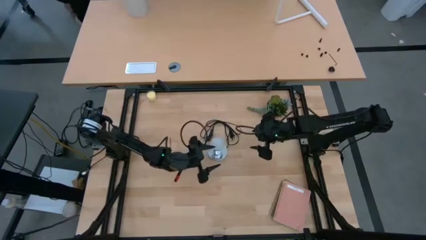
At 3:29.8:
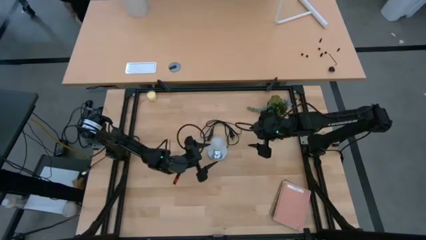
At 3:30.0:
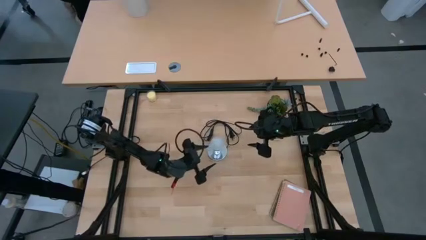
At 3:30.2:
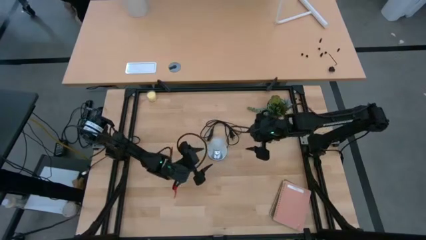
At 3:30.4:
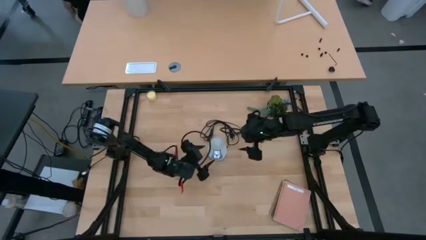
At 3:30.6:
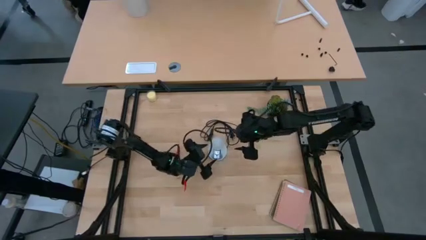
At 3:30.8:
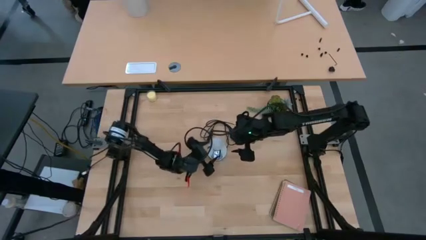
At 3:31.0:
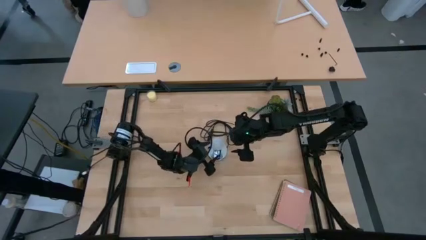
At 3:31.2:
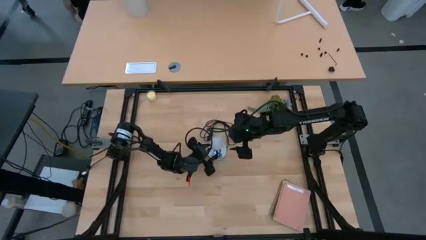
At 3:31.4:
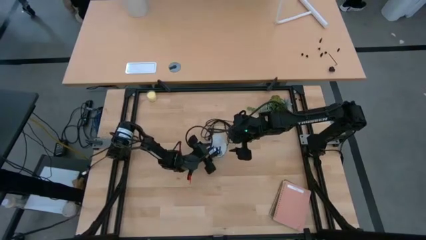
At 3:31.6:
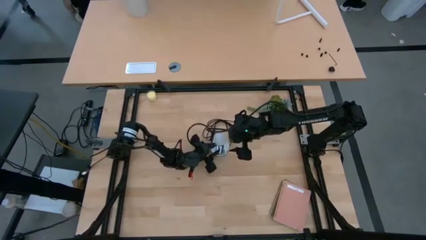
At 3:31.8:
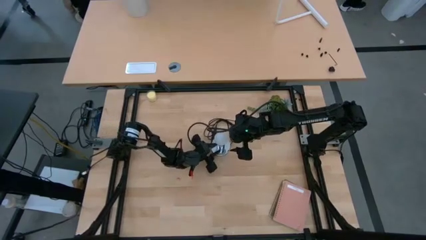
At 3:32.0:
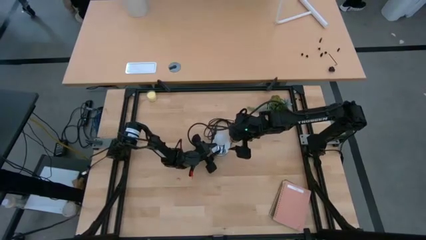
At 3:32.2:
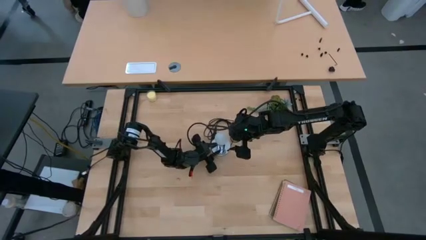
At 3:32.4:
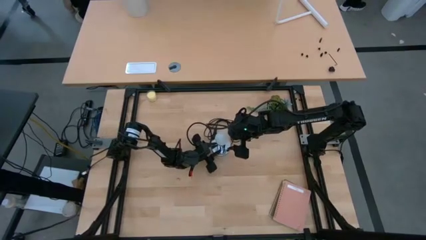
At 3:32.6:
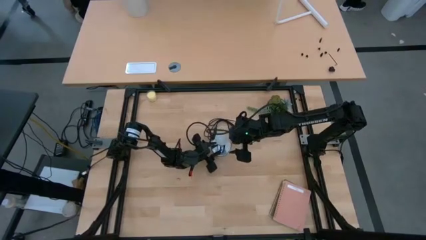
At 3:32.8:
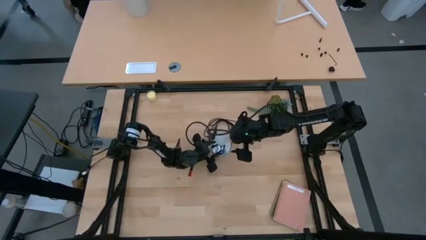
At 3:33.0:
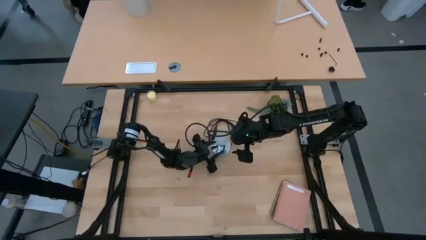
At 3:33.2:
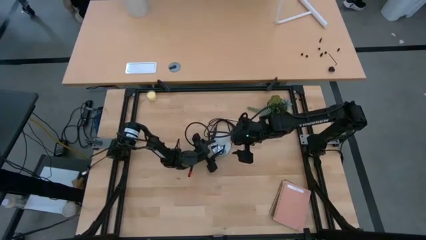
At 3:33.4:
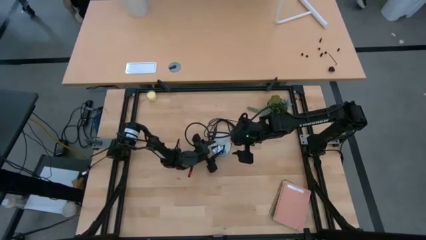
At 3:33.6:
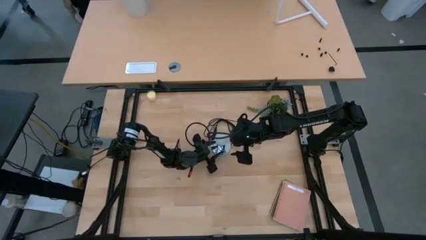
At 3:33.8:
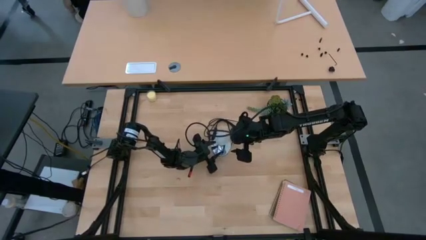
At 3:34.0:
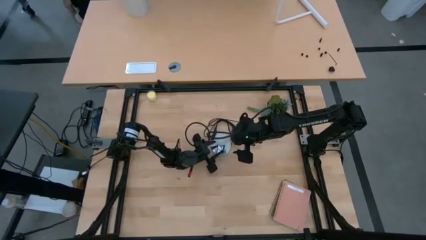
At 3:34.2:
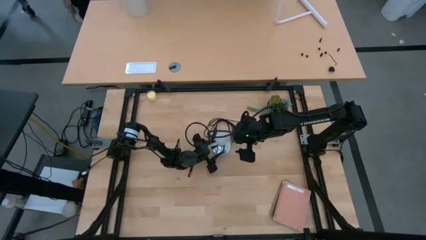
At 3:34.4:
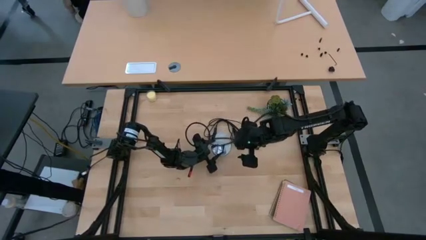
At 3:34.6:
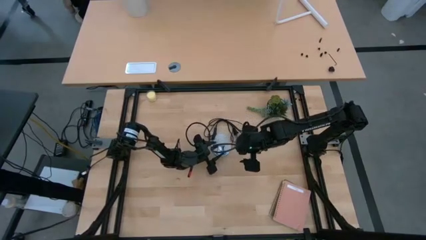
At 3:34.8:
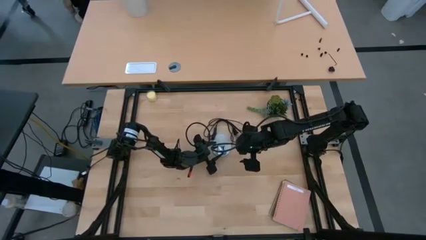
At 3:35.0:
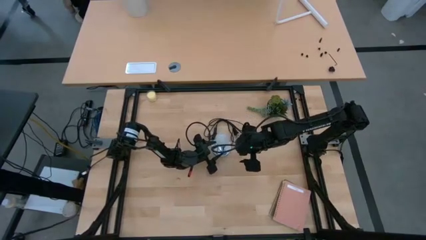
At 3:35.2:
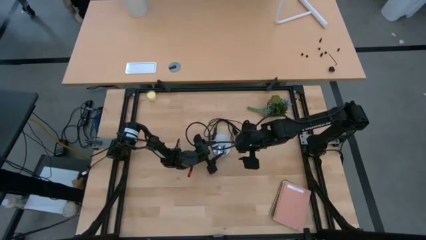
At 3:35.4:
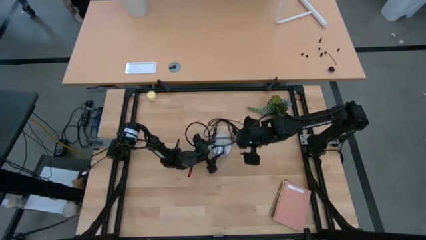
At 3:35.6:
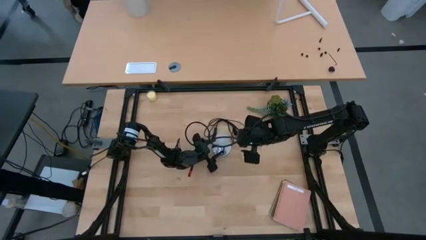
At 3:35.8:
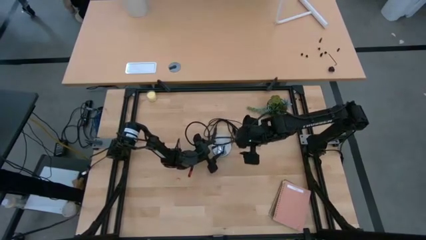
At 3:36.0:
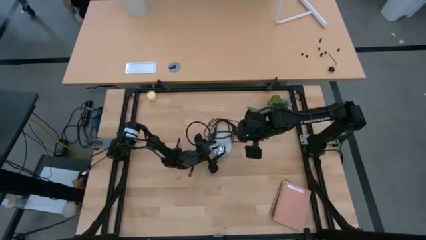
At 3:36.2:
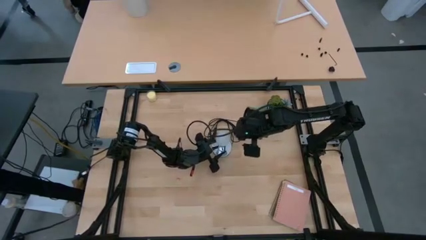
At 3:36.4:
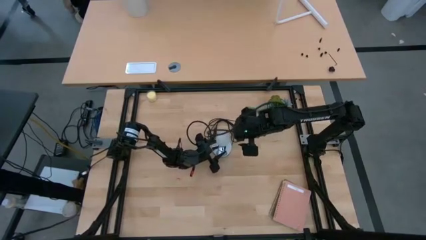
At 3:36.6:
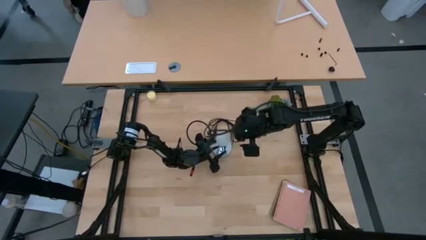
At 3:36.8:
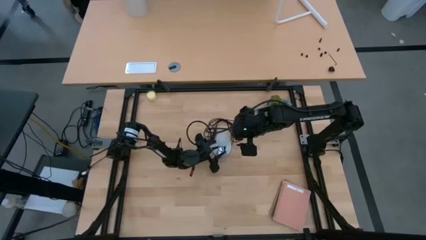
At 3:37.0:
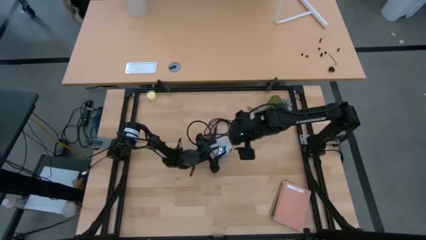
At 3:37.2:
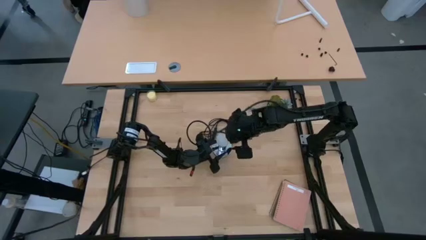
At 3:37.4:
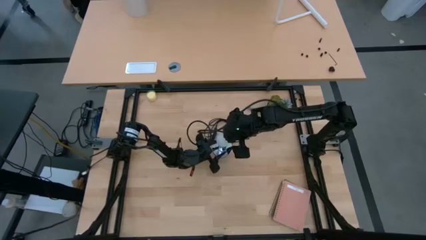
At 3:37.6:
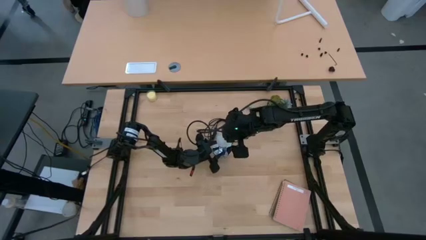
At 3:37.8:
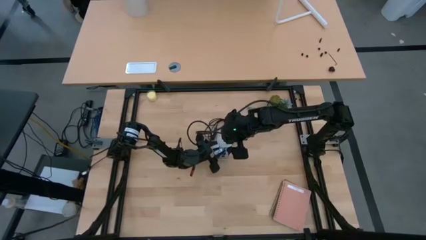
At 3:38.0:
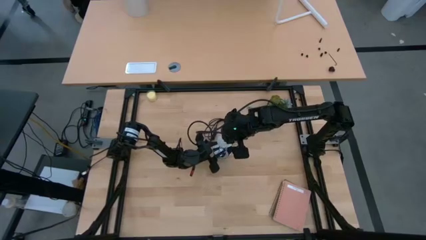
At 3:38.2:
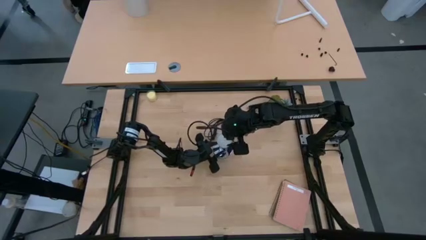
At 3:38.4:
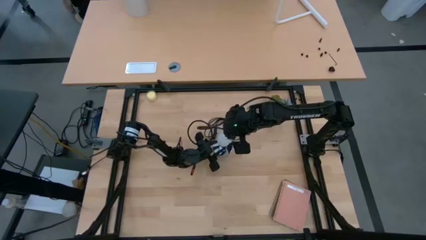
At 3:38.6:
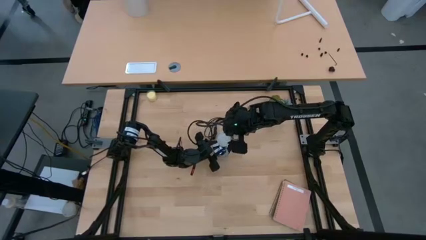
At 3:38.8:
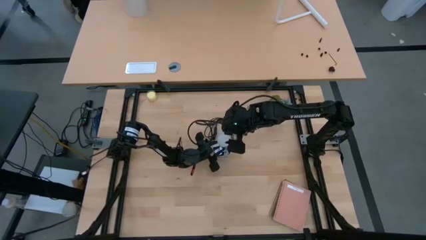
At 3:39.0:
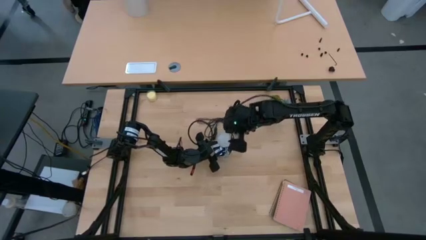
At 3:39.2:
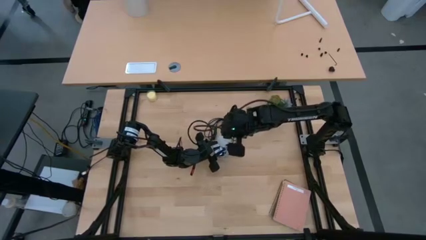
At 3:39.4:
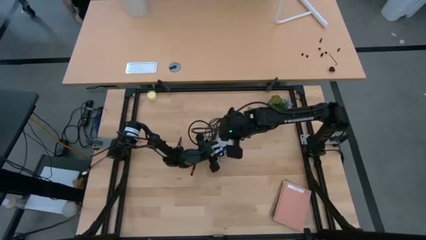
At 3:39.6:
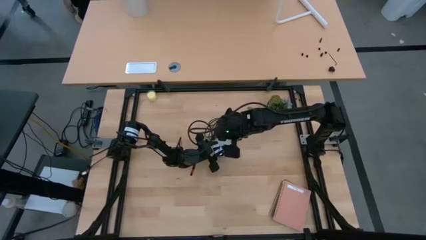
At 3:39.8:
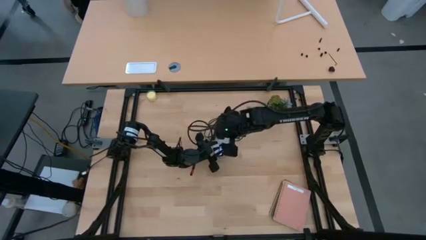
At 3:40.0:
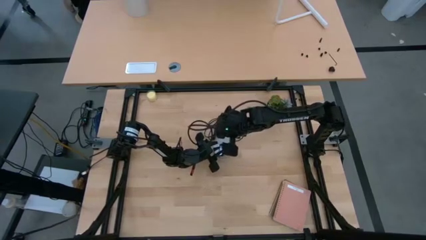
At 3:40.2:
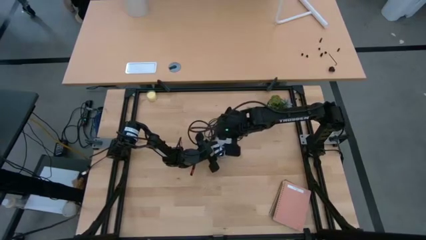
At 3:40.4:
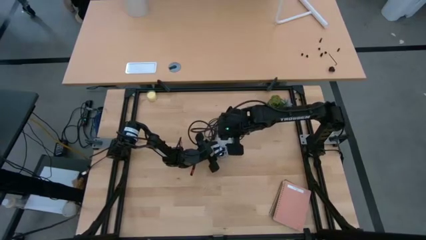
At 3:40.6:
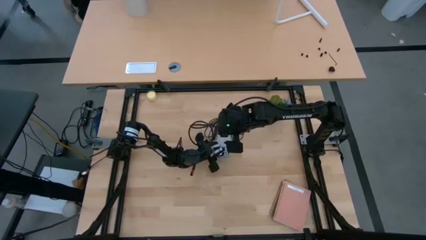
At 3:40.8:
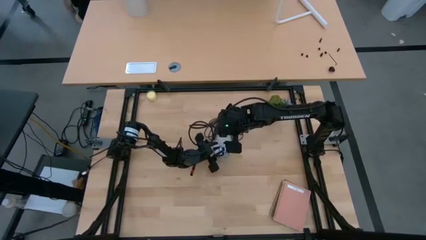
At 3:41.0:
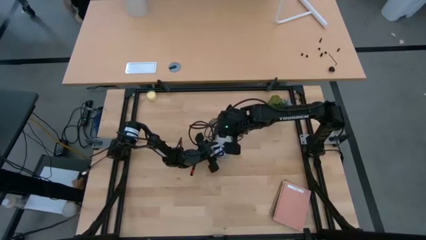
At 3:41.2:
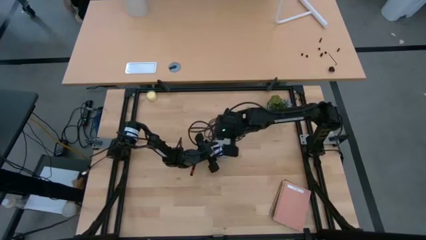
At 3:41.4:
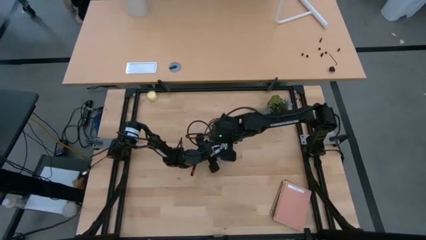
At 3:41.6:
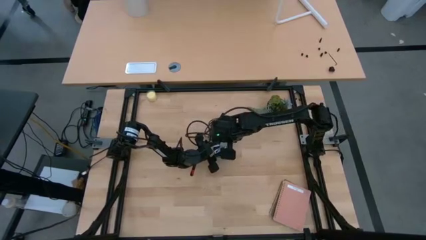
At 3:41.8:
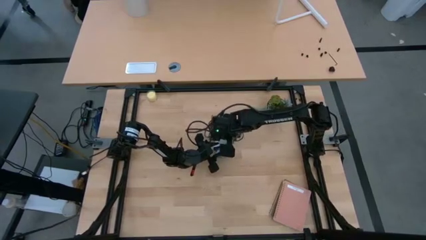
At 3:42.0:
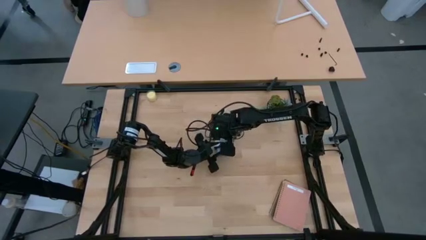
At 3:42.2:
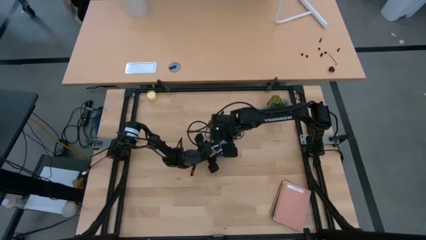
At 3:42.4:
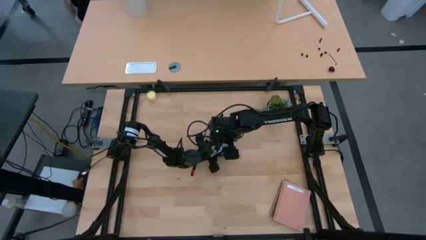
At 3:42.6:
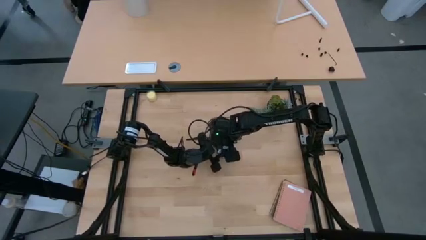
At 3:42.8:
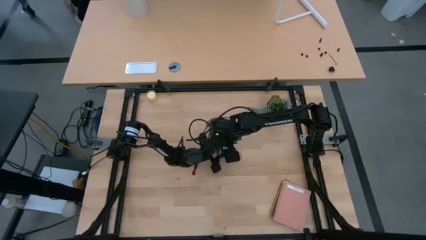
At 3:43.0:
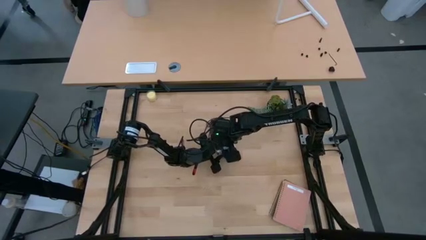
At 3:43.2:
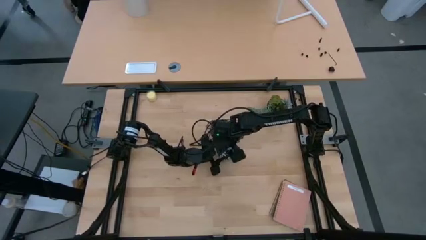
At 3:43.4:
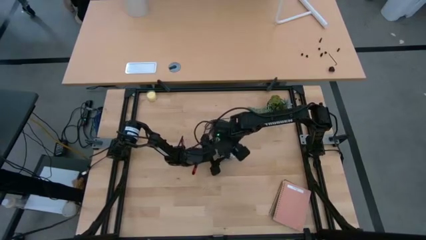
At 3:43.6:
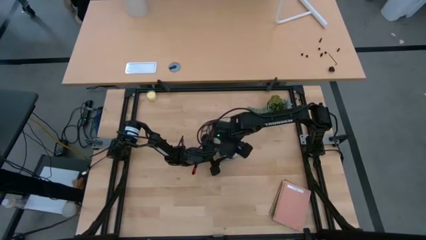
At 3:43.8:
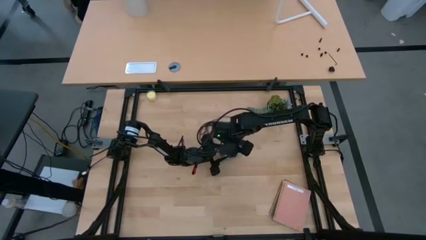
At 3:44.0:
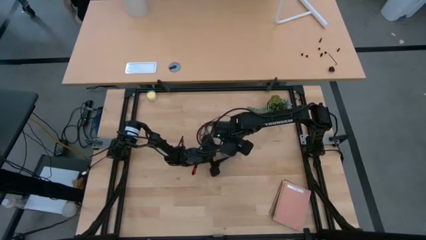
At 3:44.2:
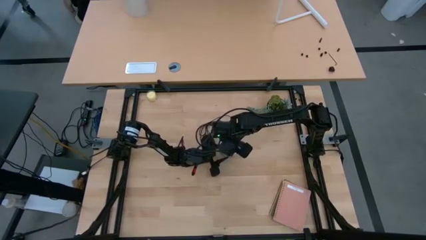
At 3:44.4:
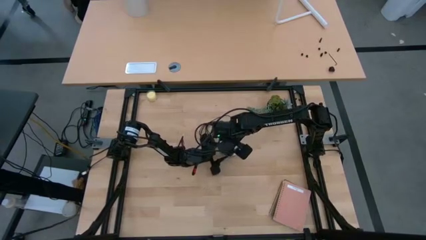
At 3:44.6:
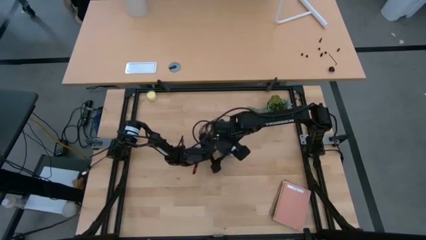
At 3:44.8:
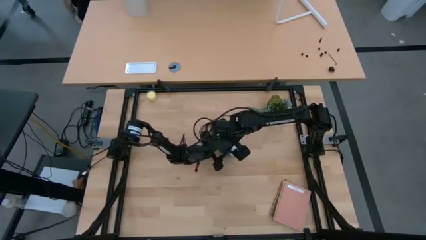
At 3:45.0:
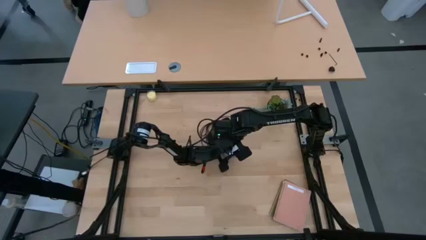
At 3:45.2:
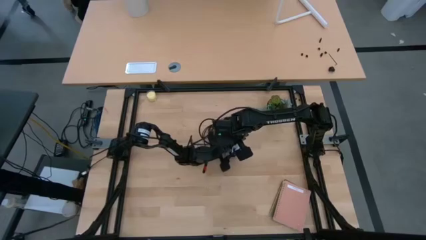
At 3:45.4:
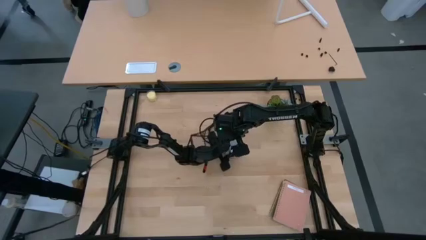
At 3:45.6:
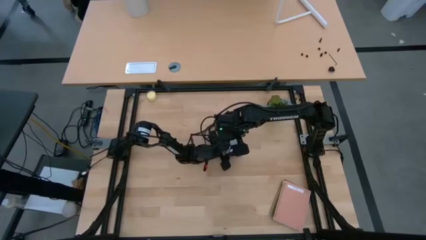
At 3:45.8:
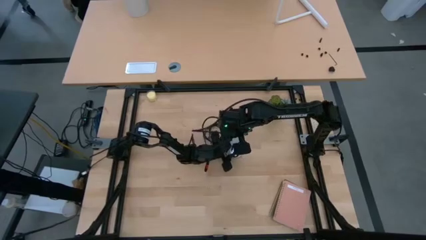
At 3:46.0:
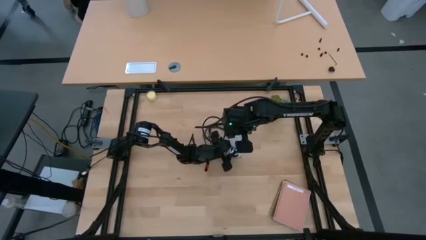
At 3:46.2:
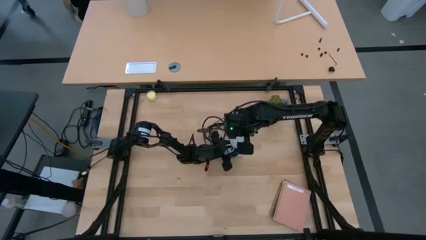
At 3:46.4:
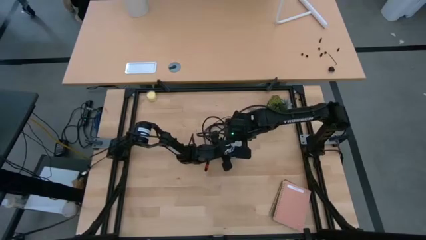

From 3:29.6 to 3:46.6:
Task: Screw lightbulb
Remove the white lightbulb from the metallic lamp
